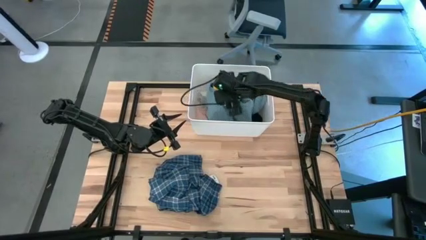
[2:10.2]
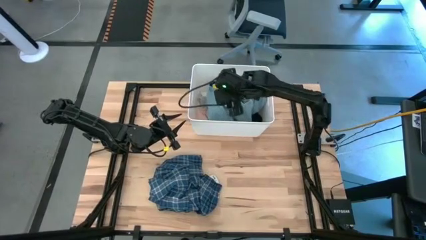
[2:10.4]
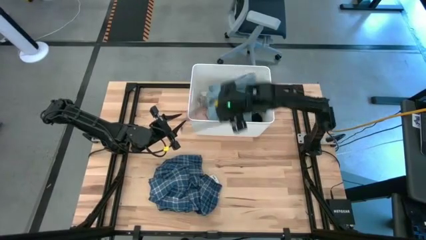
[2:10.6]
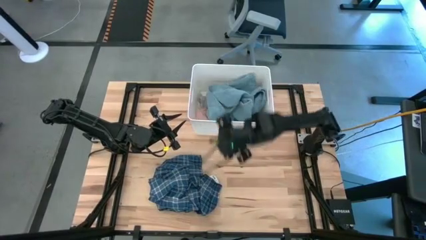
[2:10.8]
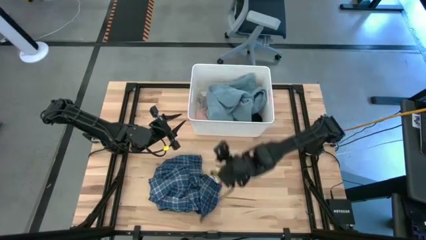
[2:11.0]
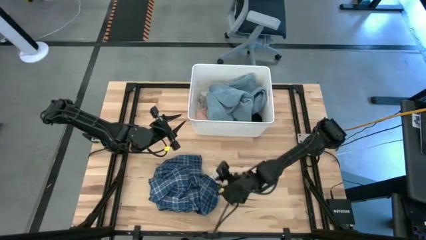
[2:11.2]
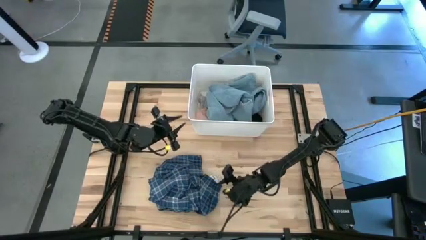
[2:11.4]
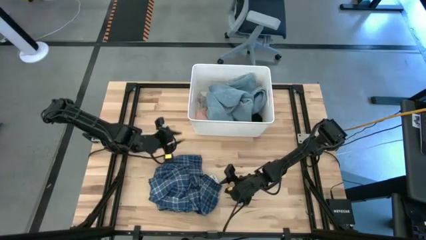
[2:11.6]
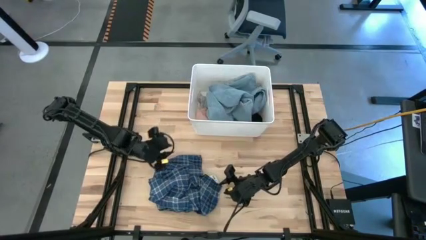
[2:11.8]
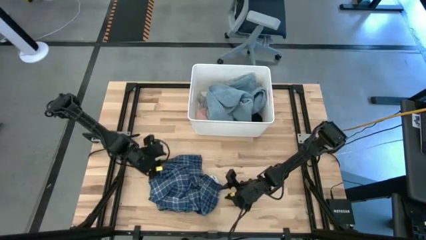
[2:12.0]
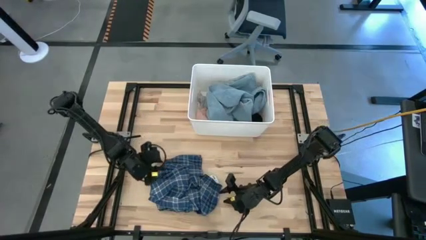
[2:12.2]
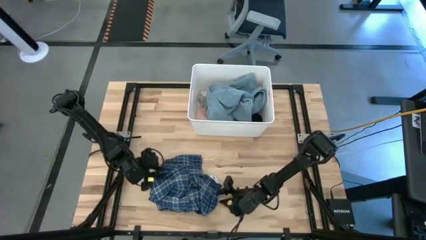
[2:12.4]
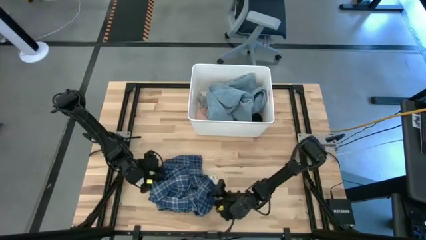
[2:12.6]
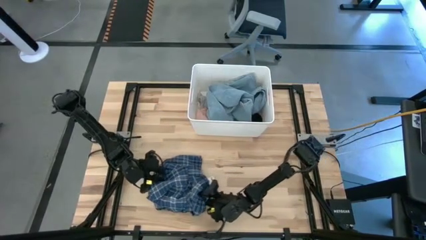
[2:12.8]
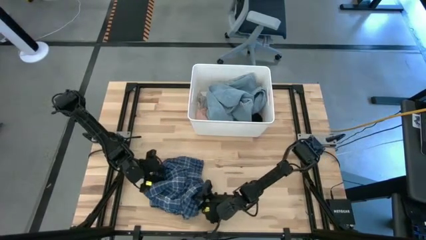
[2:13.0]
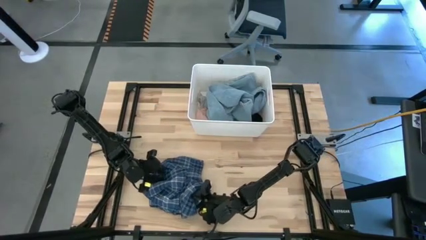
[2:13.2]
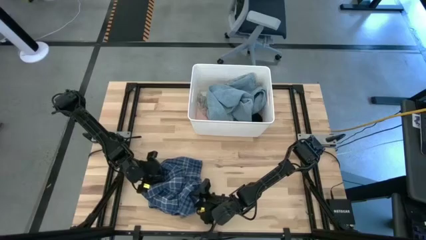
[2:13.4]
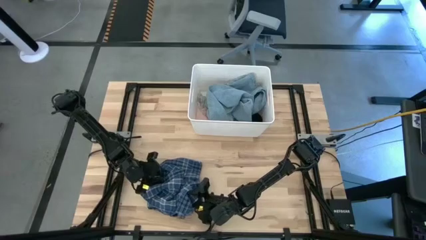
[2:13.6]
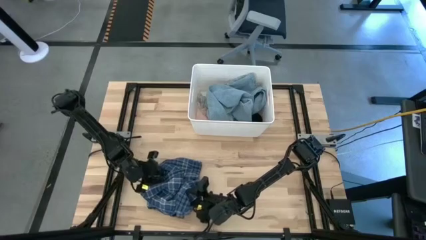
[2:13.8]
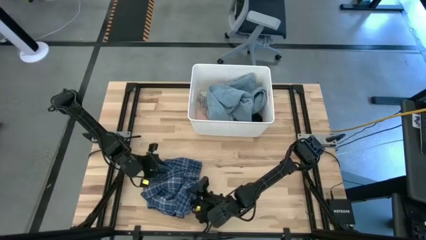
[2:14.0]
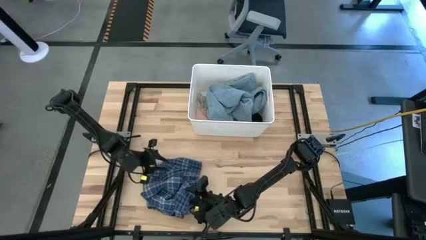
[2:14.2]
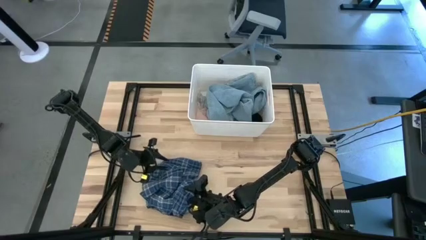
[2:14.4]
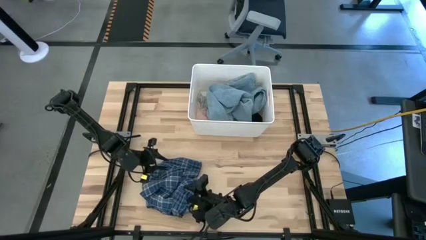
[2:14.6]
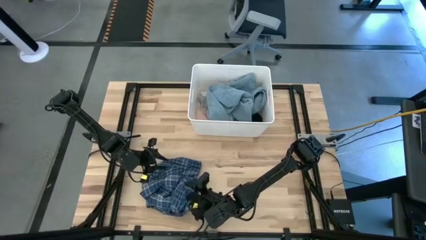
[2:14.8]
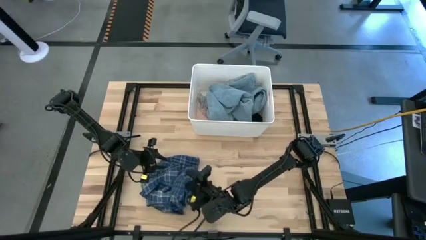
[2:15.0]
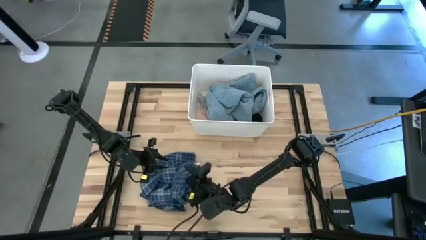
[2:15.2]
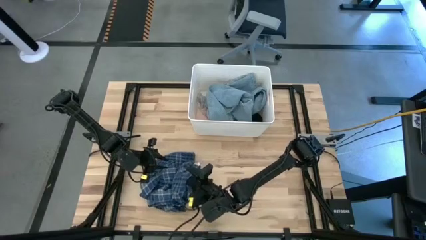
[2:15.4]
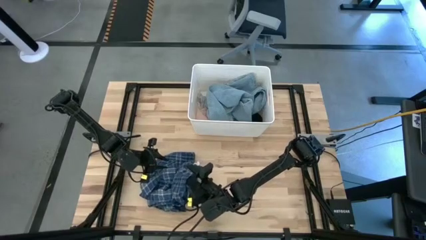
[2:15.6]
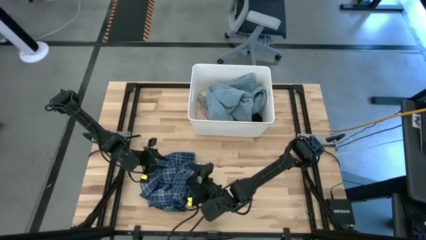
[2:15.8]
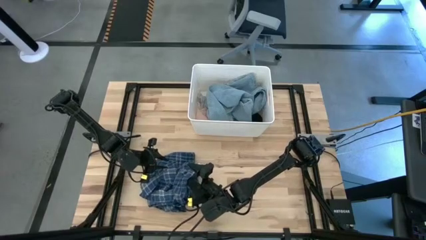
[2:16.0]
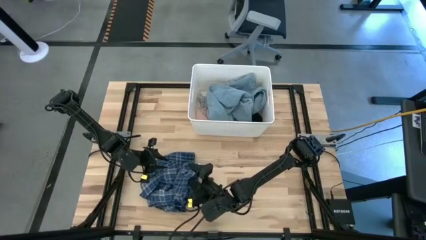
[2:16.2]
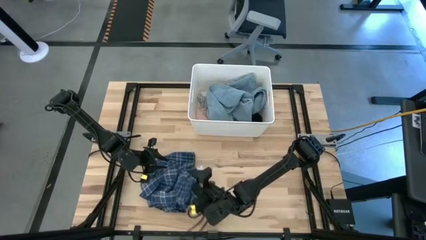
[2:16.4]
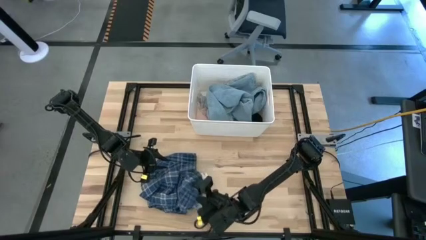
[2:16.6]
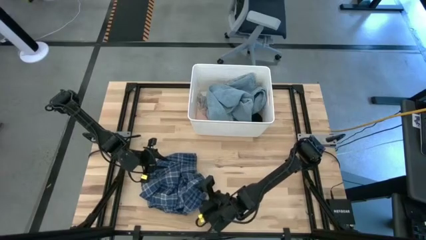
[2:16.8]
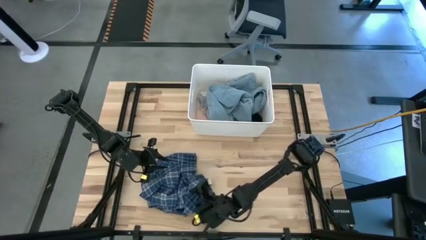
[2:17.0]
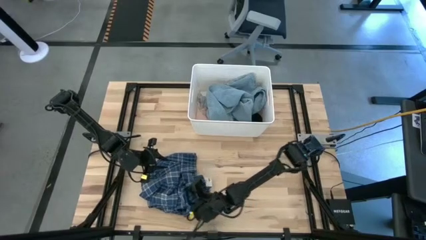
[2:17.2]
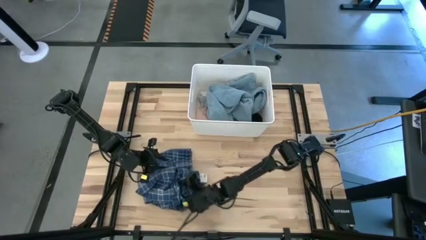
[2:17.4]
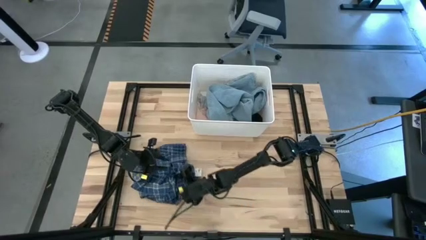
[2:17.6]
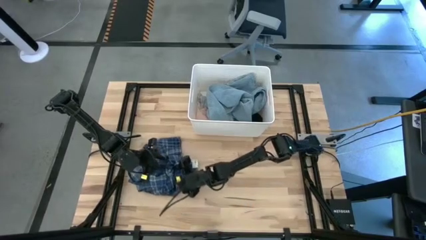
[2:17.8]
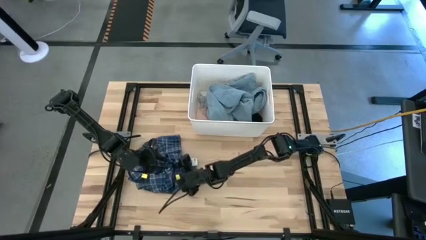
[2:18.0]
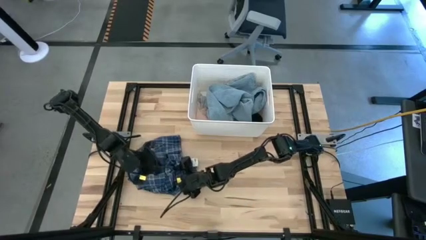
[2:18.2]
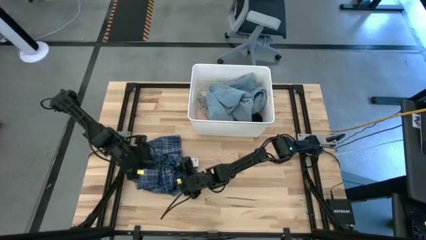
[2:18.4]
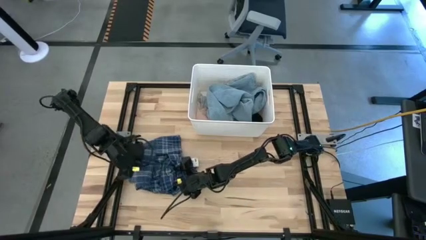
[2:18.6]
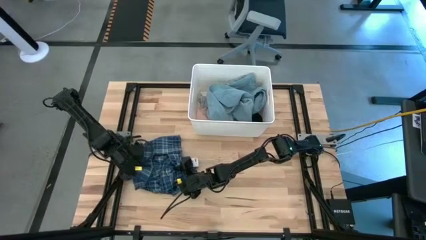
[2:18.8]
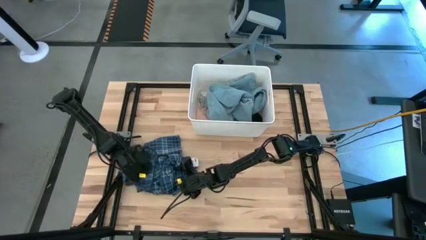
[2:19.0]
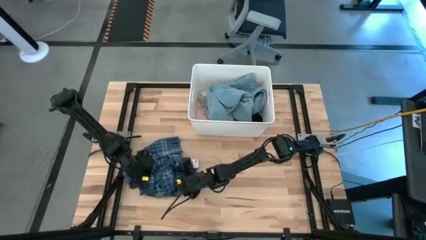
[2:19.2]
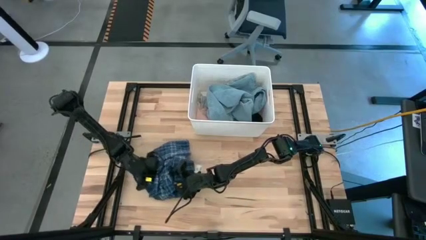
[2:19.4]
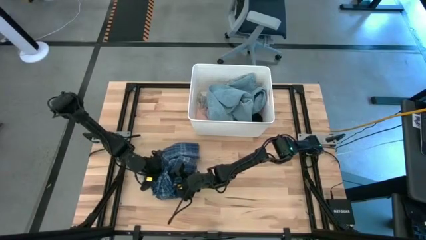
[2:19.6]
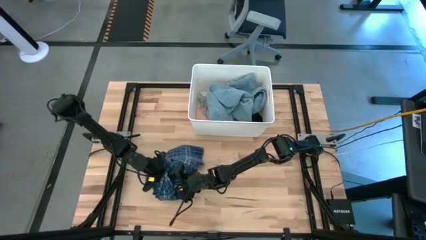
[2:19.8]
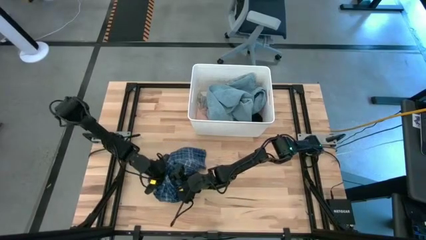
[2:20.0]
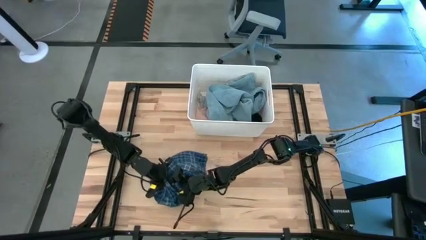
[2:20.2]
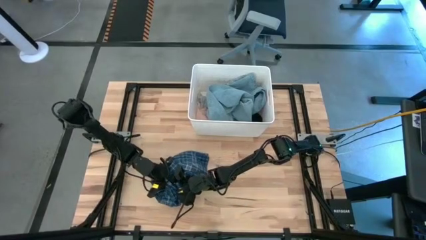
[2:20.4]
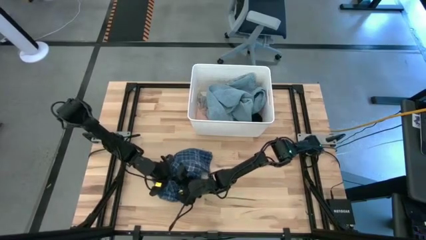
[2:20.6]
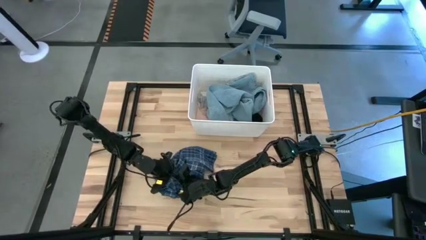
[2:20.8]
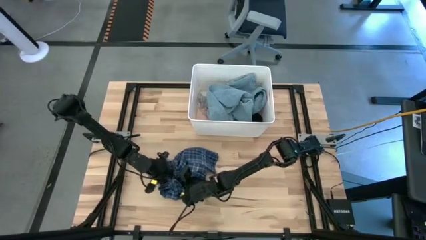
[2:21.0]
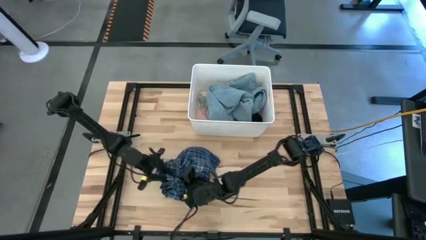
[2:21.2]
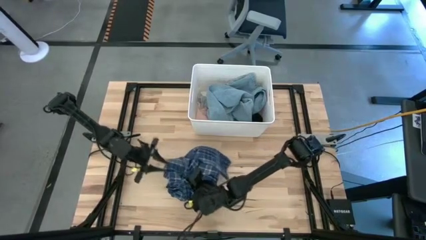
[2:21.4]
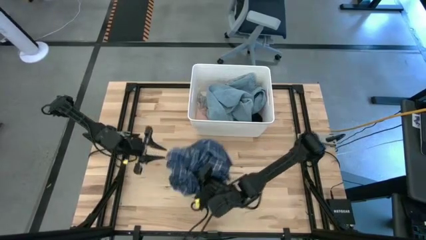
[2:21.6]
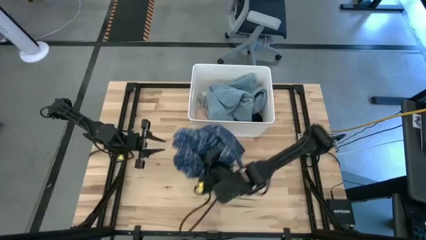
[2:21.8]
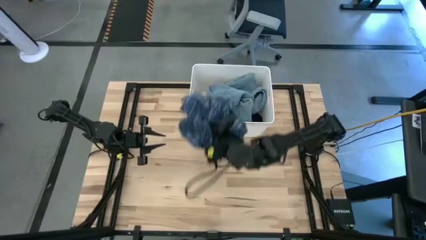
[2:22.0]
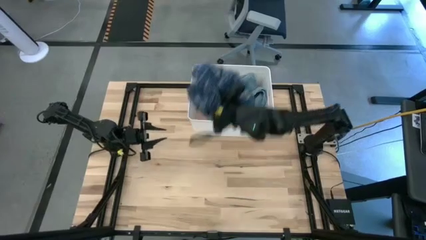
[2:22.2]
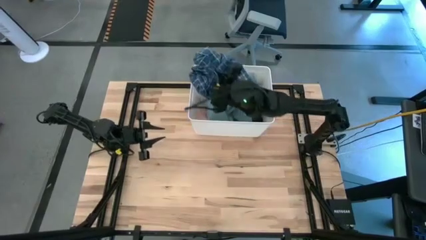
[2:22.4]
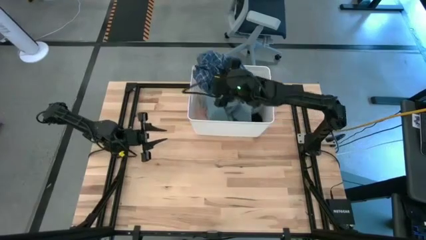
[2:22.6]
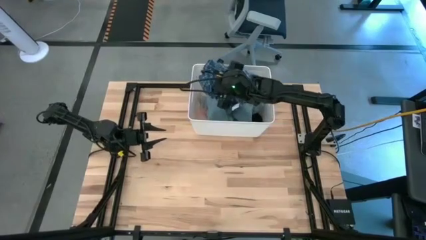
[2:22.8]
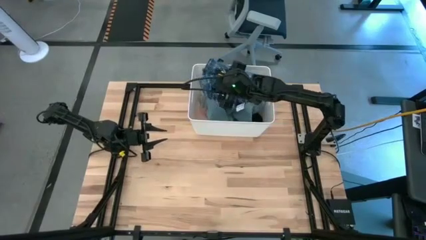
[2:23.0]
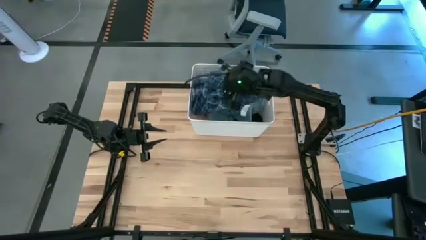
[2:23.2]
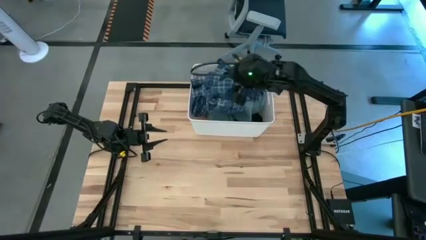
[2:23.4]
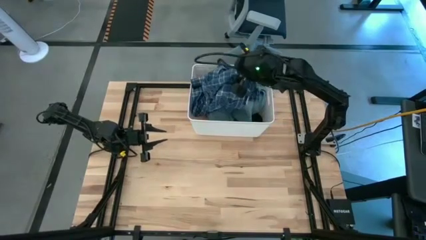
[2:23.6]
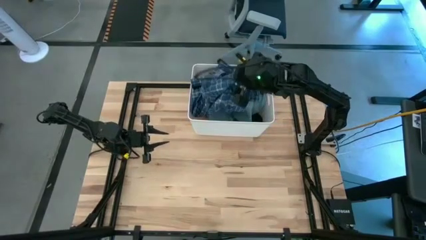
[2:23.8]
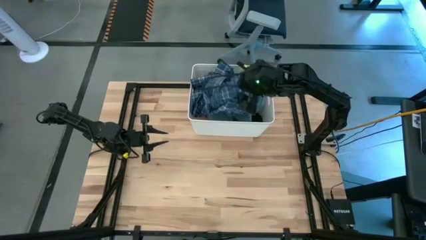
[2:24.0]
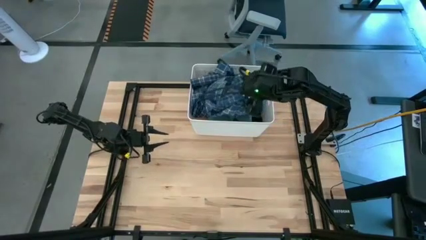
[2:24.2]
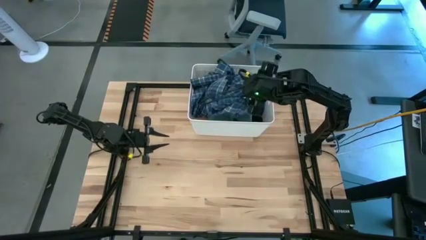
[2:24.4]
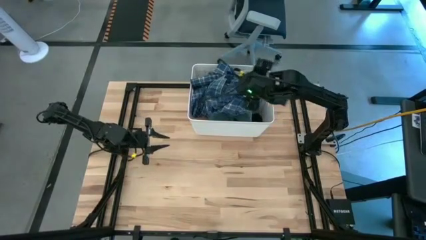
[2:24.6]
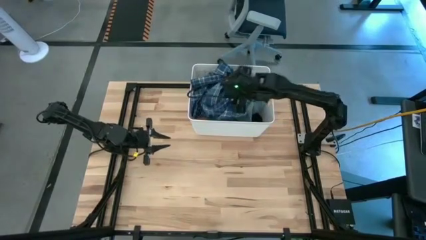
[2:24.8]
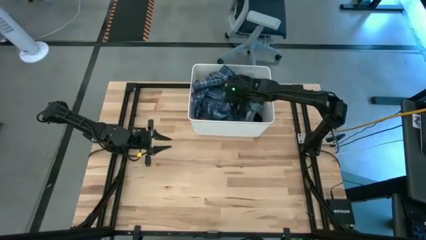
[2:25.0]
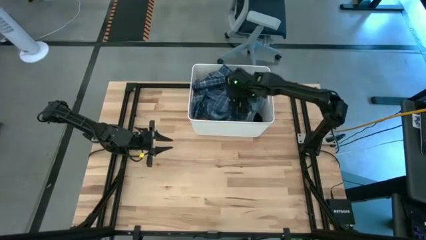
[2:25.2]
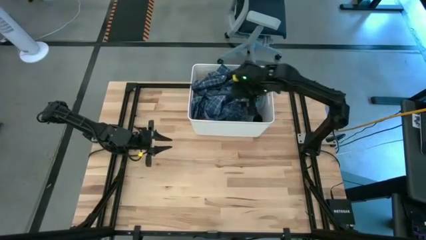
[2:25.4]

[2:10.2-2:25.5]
Task: Sort clothes
Put the blue pajamas into the white laundry bin

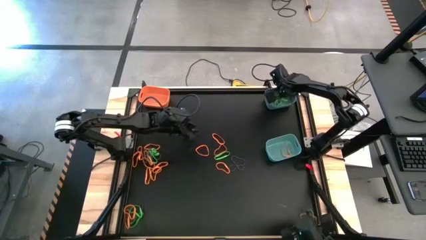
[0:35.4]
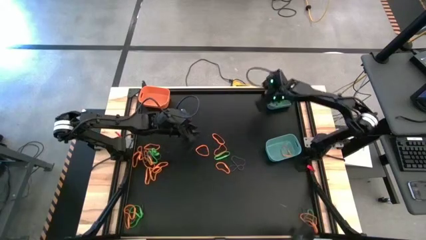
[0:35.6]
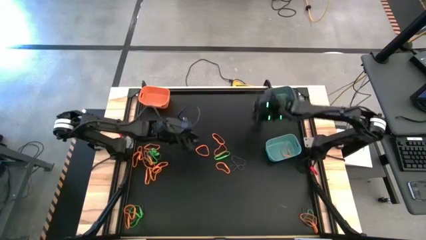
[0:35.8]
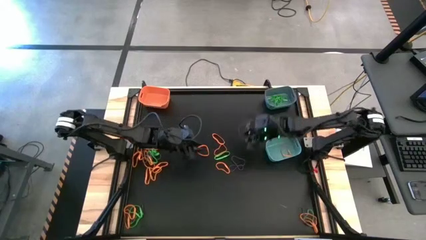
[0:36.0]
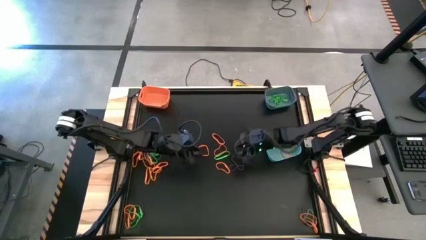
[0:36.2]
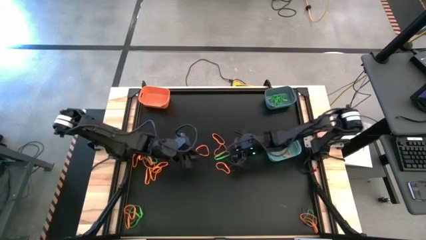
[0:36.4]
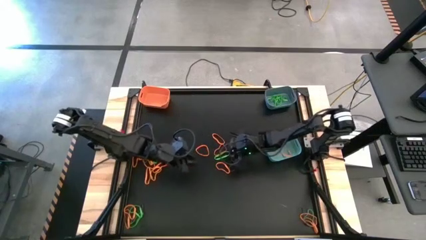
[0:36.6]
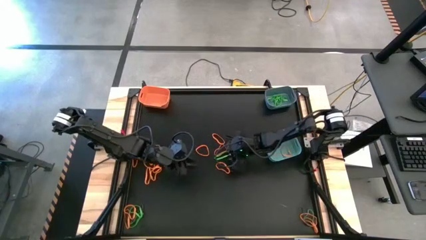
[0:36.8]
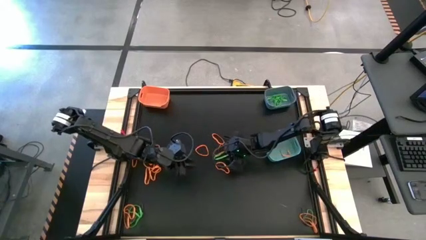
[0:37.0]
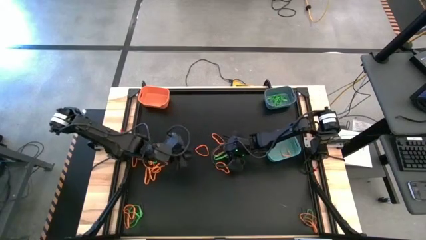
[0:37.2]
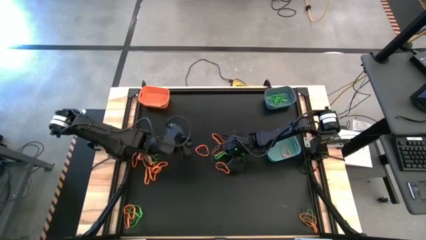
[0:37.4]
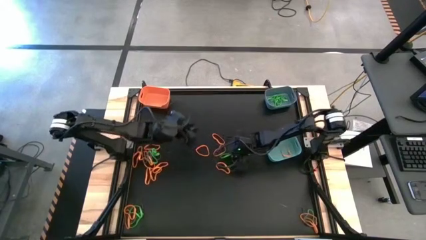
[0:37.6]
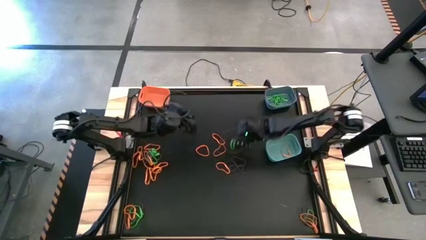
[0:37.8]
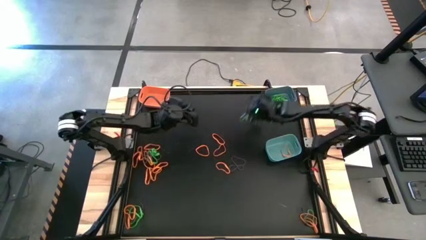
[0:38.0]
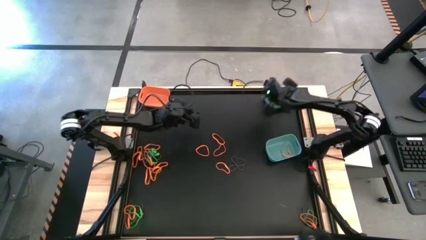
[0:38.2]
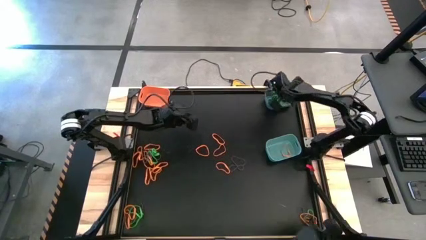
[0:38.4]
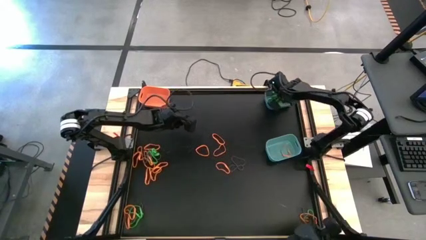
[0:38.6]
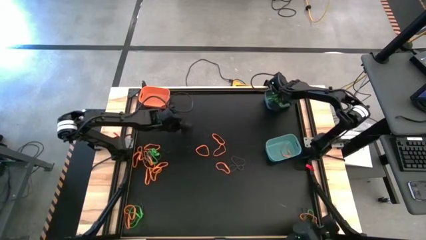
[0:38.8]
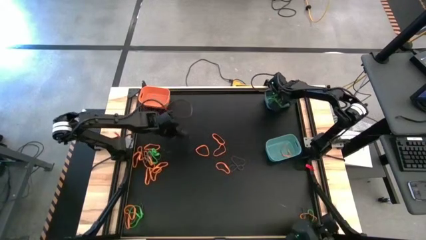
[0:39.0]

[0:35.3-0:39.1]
Task: Sort rubber bands into baskets
Put the green rubber band into the blue bin
